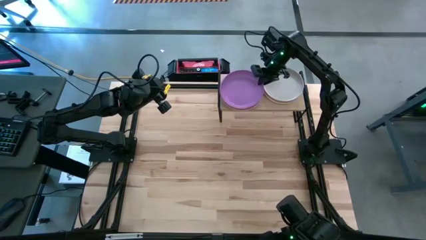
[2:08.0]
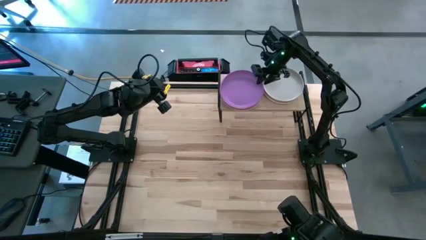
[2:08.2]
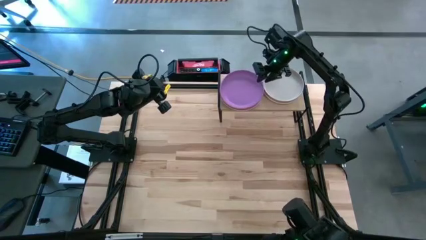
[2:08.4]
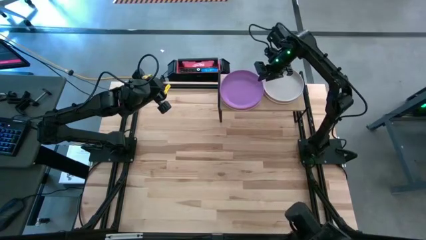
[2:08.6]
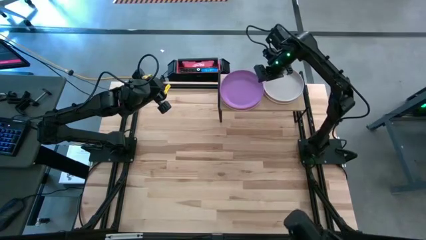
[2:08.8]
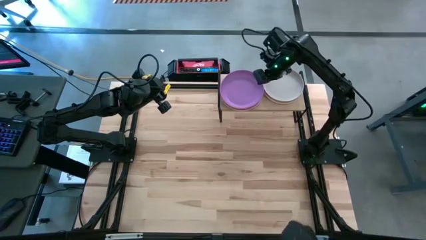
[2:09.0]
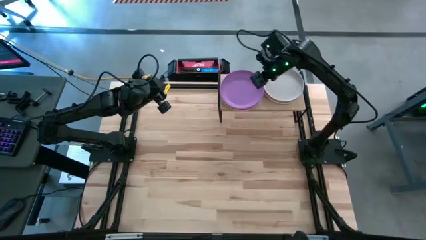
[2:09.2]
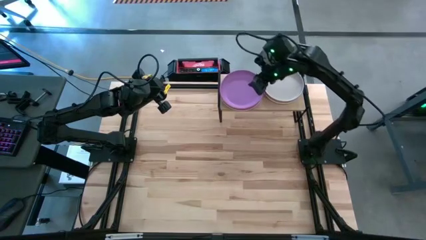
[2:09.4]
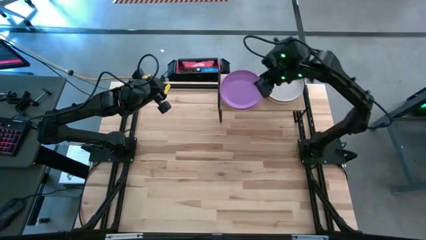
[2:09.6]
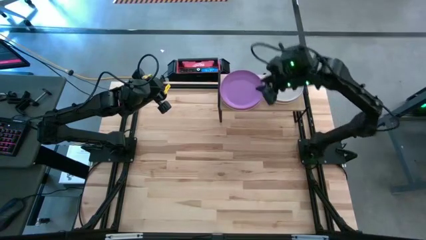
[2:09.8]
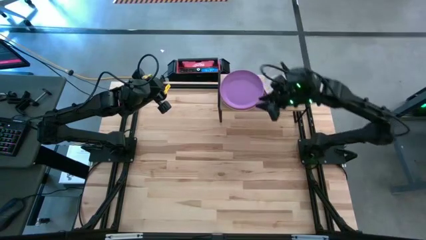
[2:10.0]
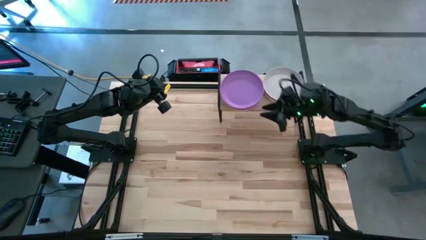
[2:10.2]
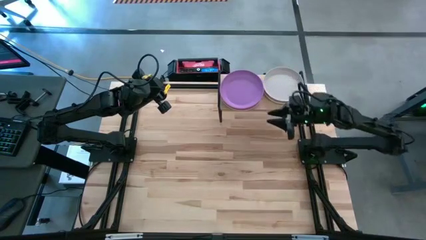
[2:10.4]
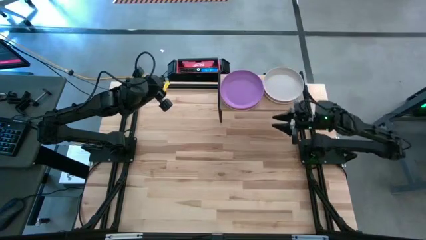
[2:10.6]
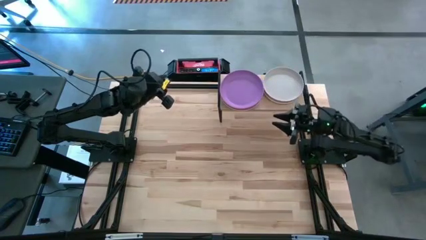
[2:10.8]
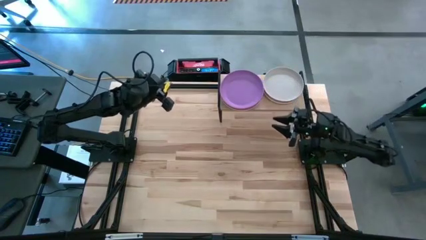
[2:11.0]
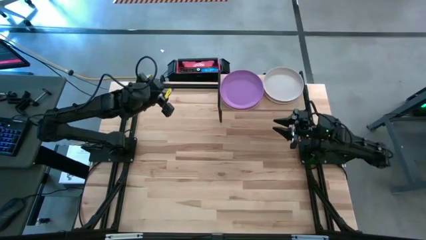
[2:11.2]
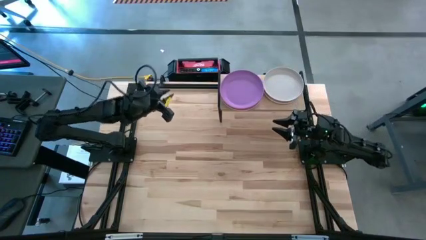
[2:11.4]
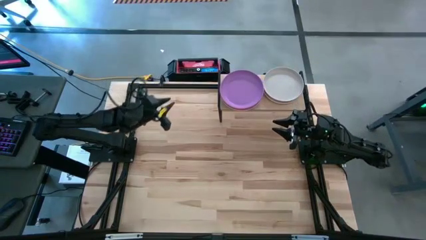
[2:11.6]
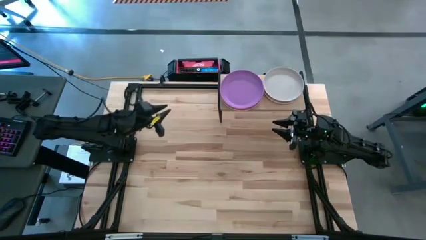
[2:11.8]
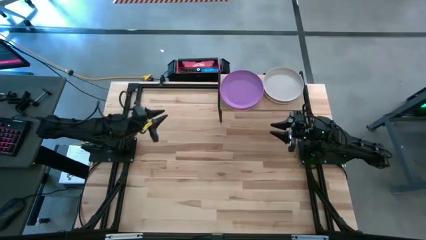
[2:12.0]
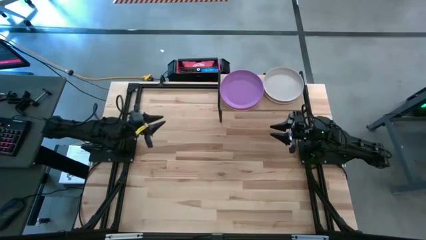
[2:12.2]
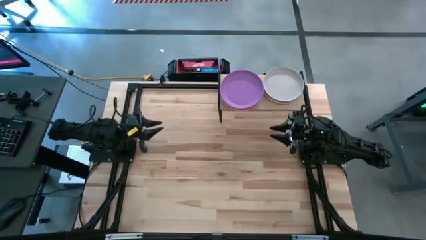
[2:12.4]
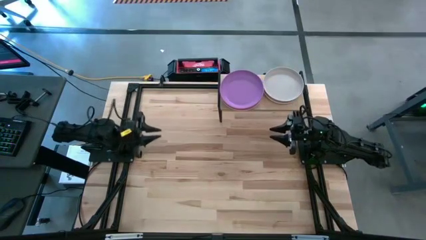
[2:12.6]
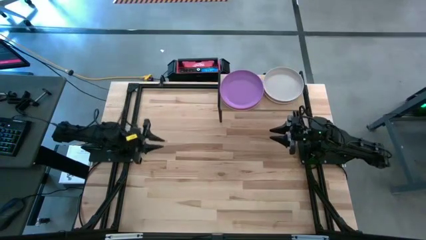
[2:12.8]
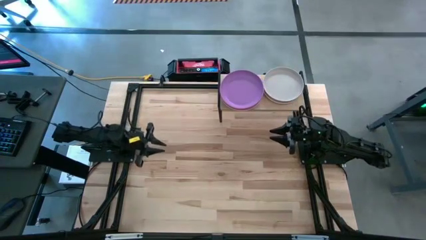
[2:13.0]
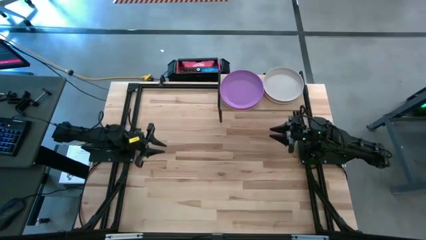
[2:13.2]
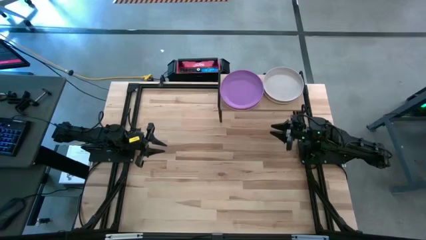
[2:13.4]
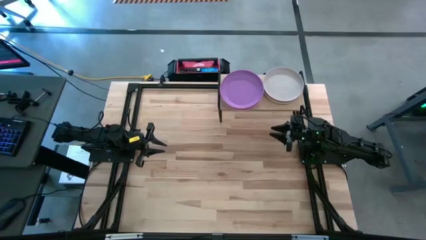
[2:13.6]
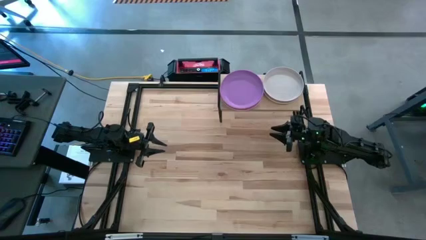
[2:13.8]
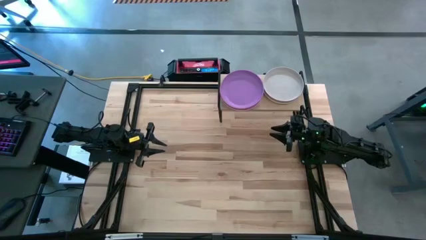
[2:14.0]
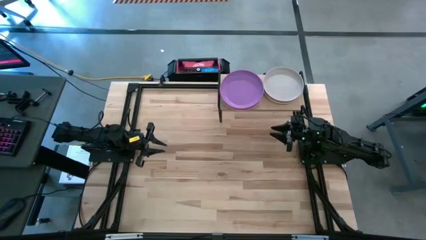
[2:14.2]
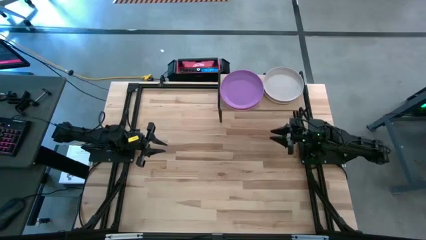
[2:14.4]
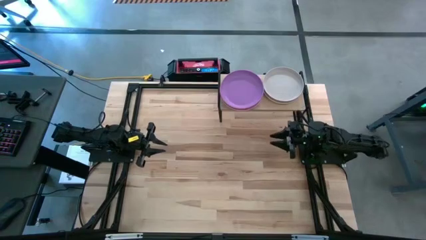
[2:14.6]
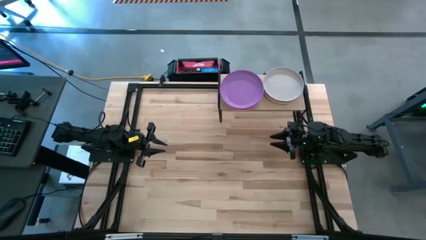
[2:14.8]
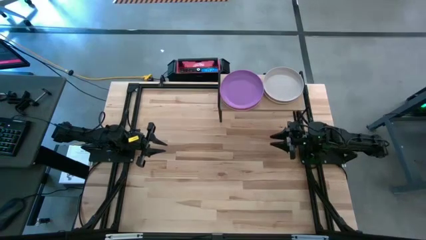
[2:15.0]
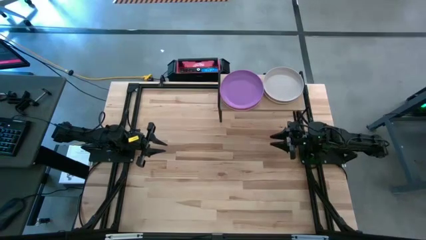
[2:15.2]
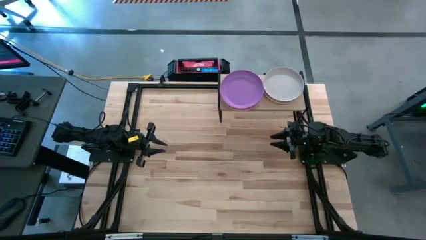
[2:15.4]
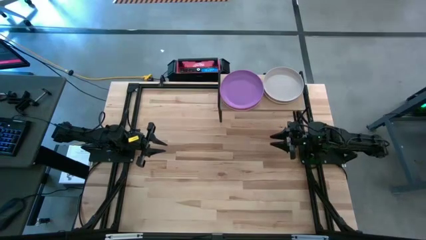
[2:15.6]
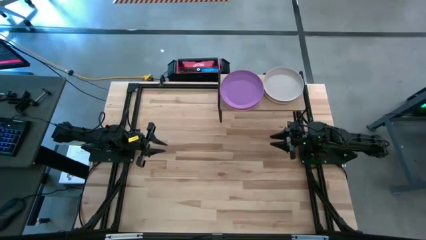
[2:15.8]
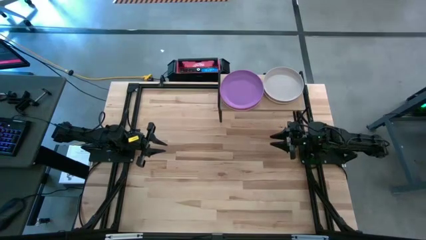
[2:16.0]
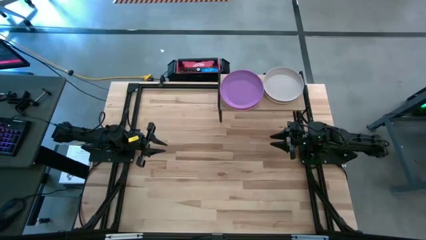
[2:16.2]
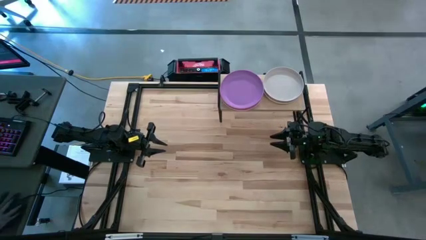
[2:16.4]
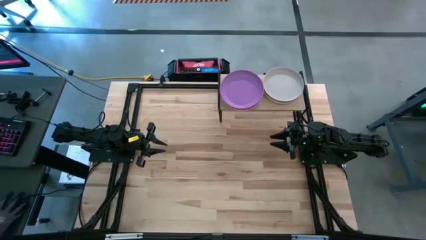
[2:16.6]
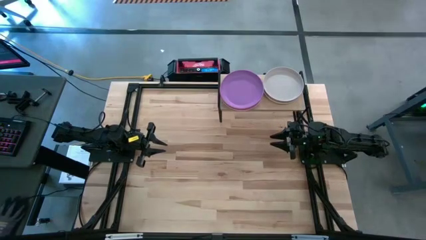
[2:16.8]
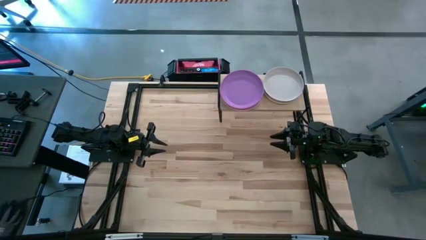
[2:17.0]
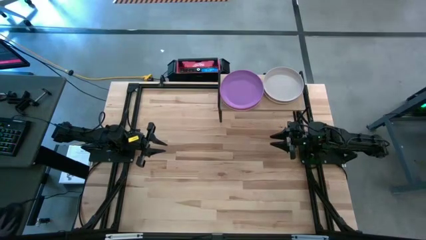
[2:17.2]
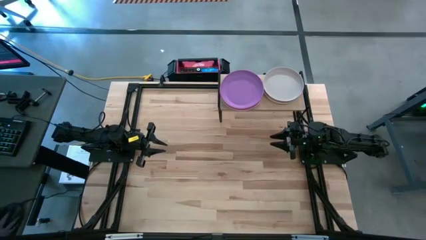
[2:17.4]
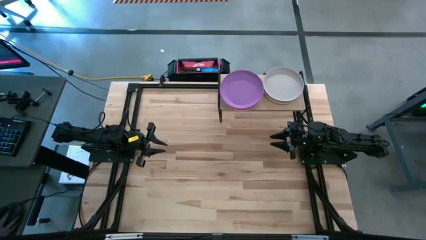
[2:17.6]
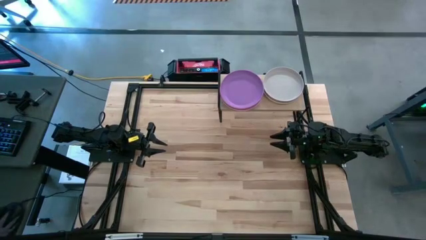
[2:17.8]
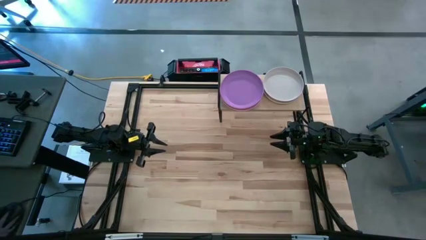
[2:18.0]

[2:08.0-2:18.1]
Task: Place and stack plates onto a shelf
Return to Home Position

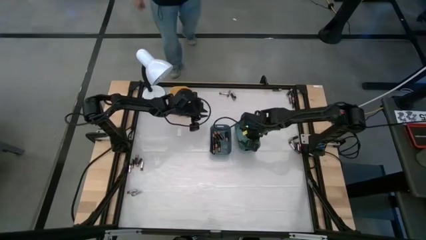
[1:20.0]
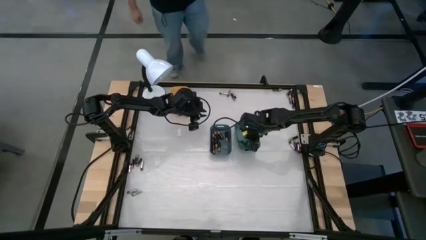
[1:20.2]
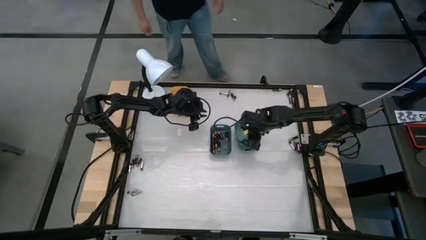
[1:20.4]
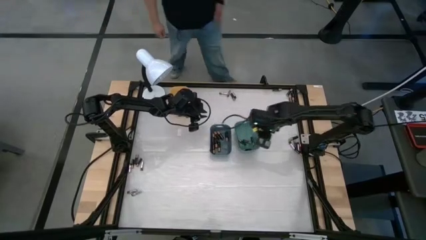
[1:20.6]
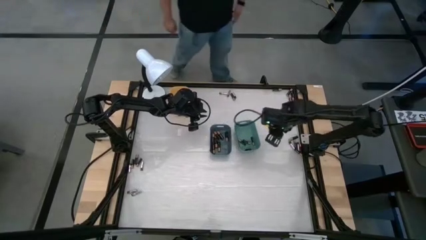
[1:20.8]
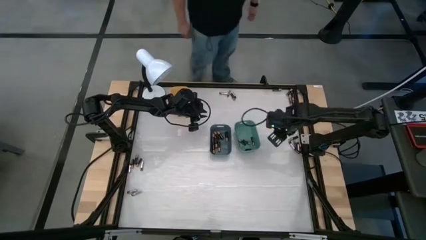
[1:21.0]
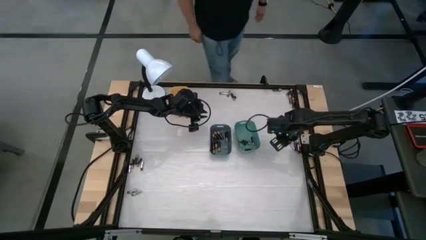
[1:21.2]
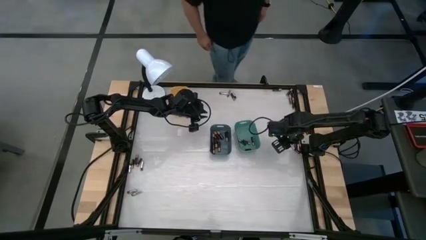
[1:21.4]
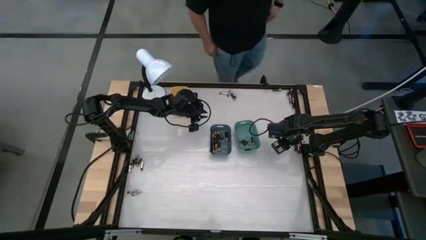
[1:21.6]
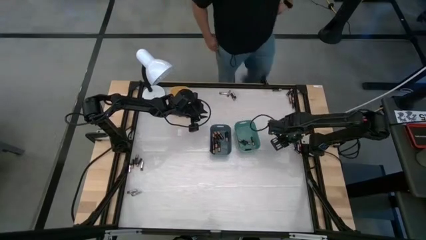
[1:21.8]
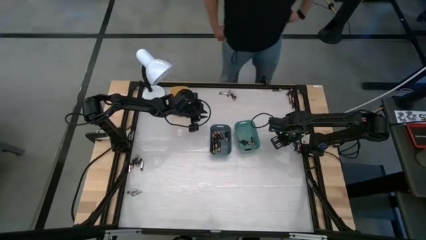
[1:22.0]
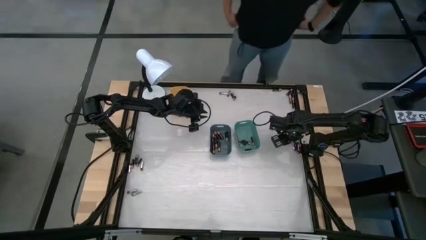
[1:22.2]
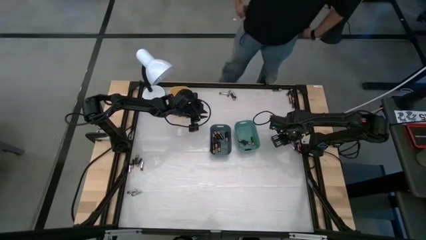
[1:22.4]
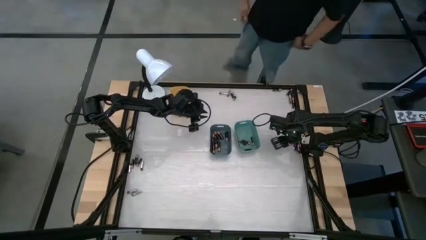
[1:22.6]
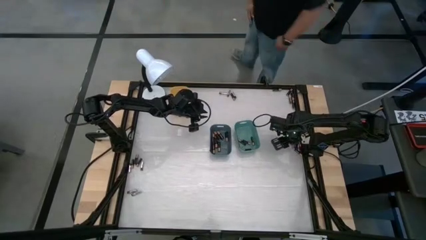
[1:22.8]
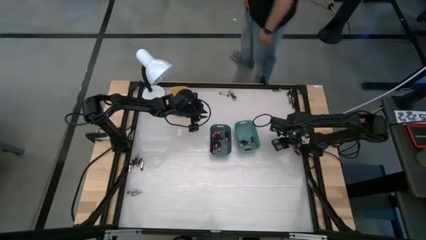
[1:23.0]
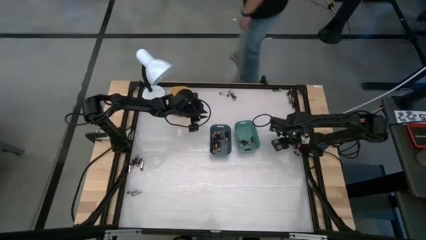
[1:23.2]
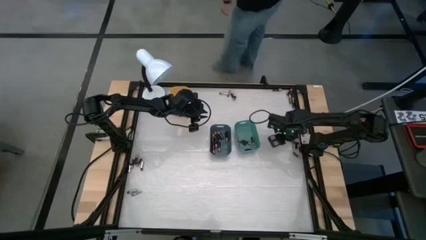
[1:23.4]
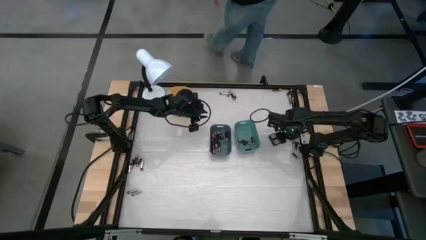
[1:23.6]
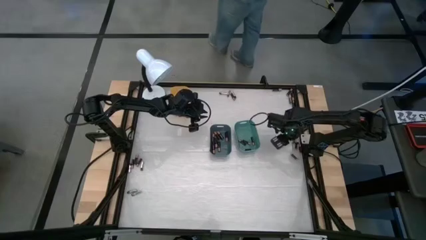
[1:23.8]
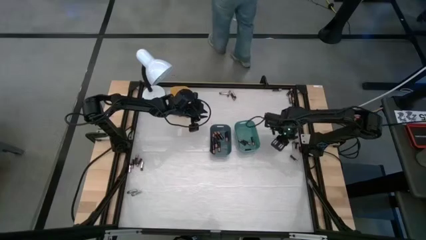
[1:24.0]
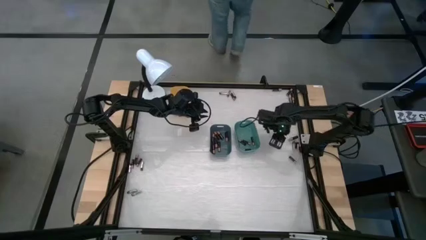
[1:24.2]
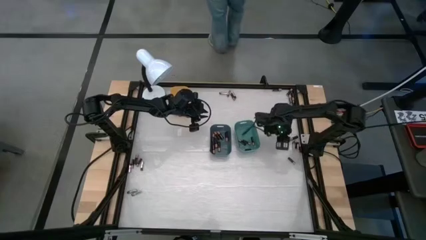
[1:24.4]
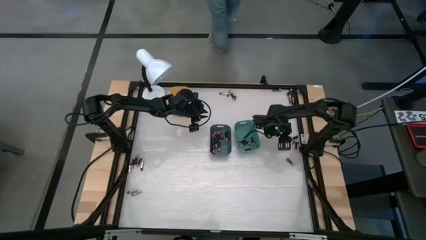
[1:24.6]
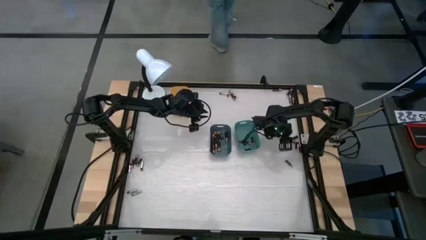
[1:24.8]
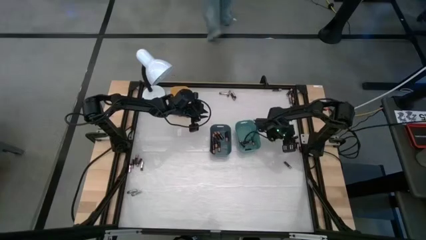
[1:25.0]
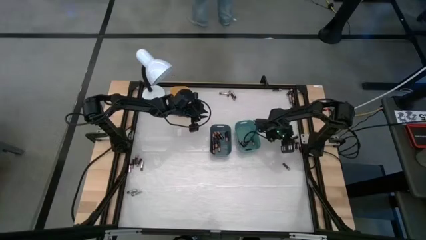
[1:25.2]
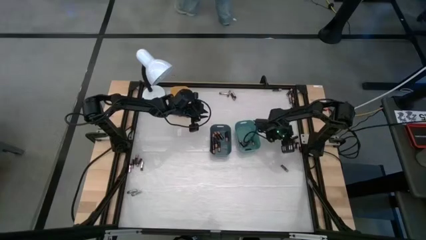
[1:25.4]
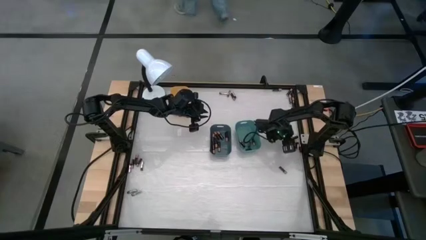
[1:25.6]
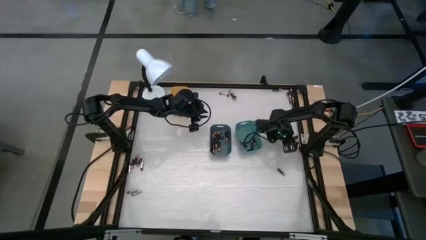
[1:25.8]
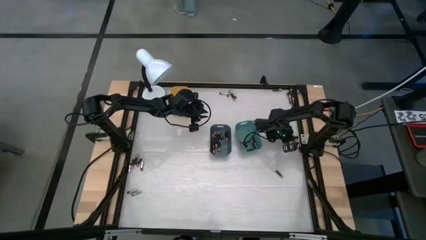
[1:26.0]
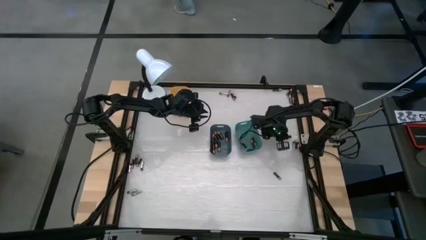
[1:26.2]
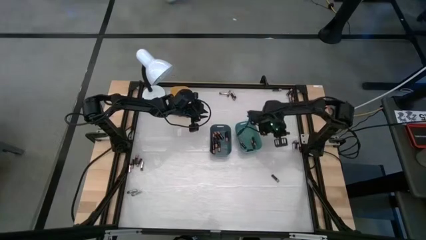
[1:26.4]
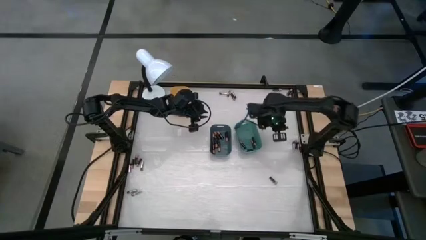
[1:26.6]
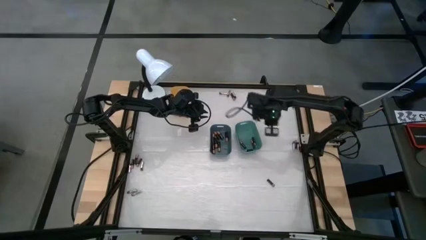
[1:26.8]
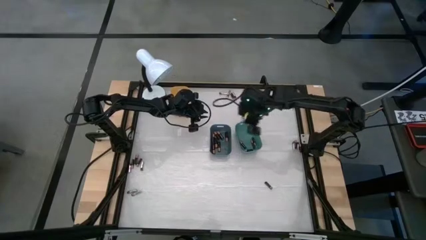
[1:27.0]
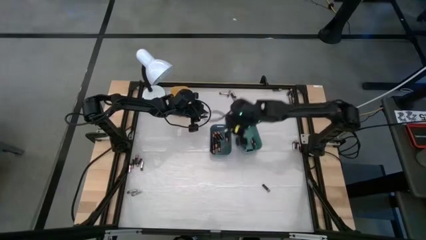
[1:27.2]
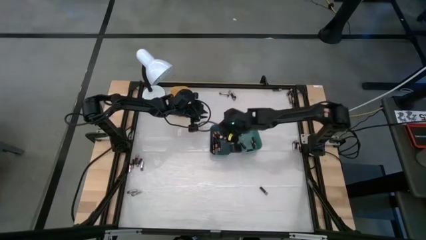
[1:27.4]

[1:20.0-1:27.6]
Task: Sort batteries
Put the black battery into the blue bin
